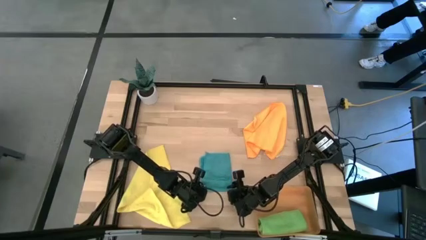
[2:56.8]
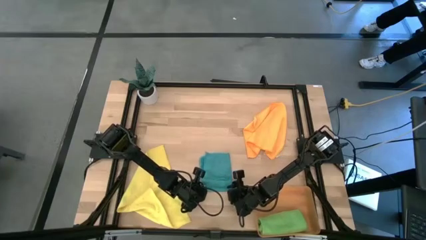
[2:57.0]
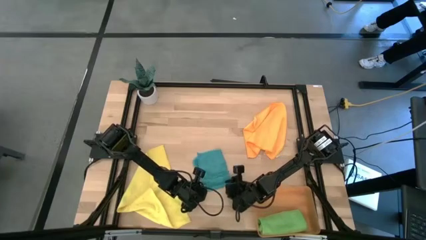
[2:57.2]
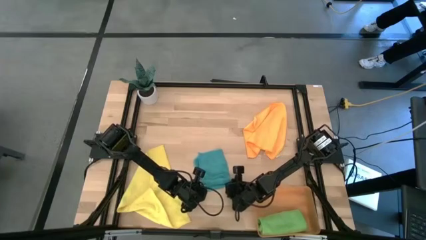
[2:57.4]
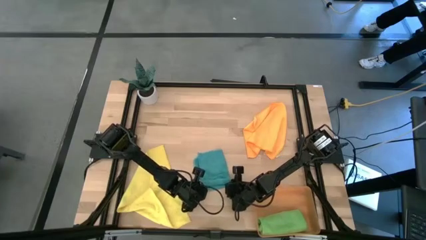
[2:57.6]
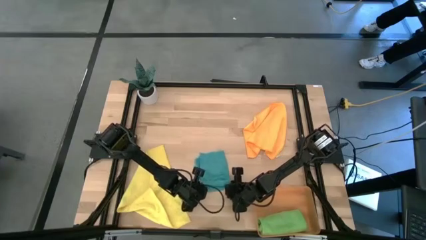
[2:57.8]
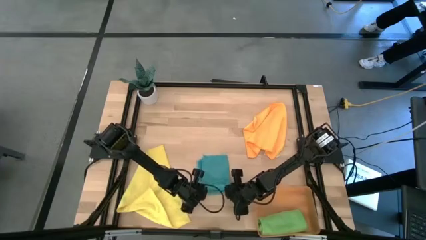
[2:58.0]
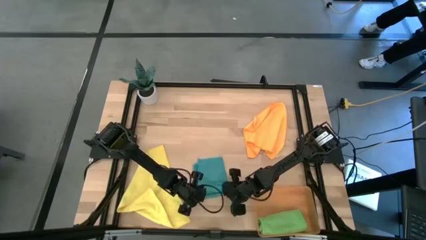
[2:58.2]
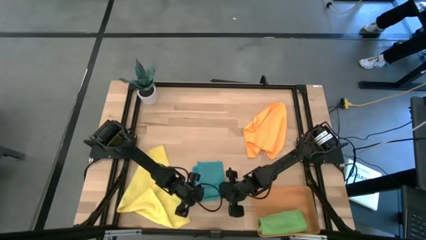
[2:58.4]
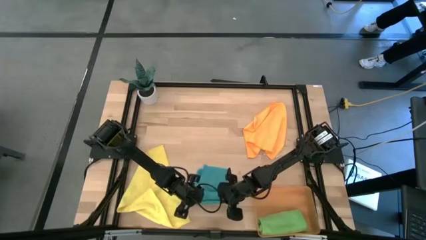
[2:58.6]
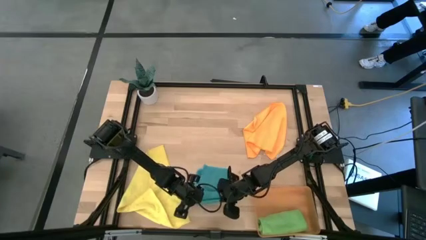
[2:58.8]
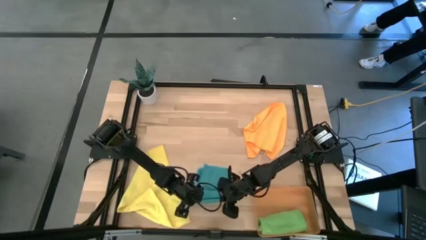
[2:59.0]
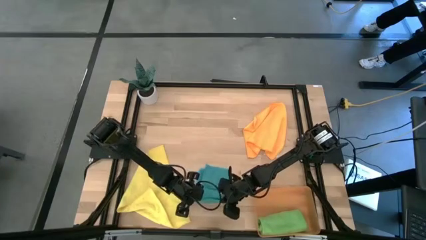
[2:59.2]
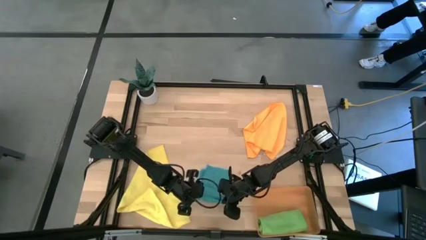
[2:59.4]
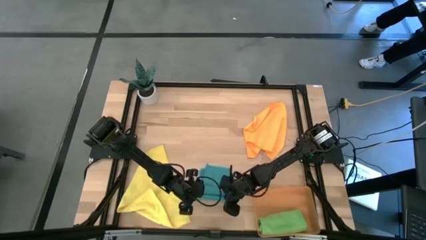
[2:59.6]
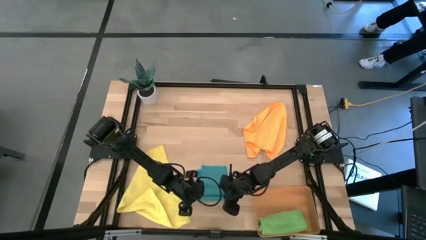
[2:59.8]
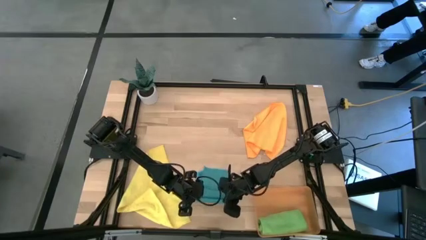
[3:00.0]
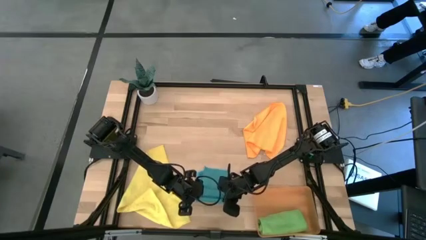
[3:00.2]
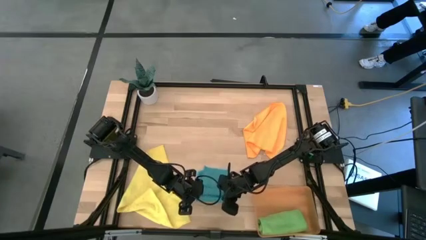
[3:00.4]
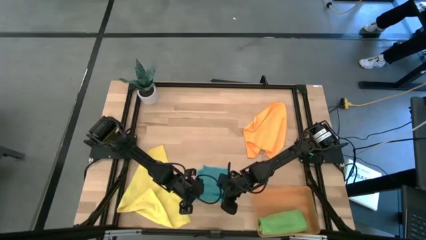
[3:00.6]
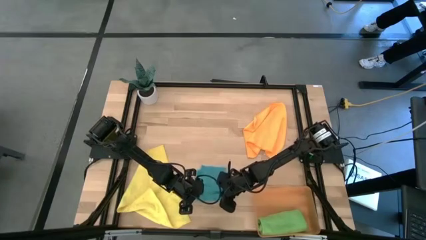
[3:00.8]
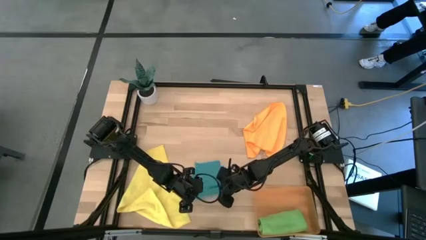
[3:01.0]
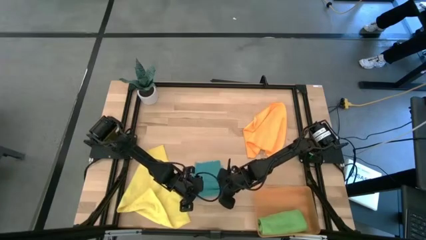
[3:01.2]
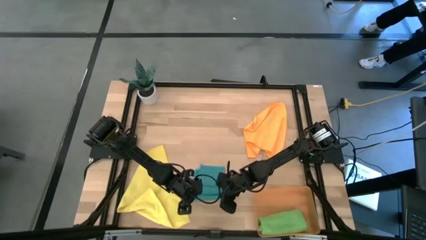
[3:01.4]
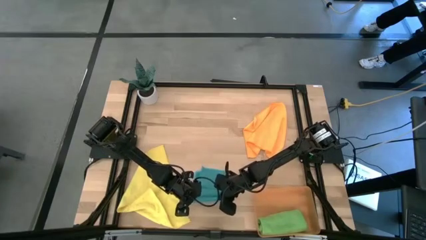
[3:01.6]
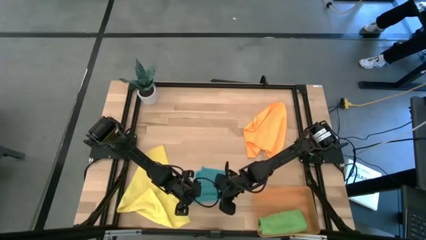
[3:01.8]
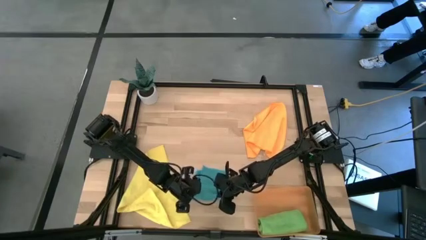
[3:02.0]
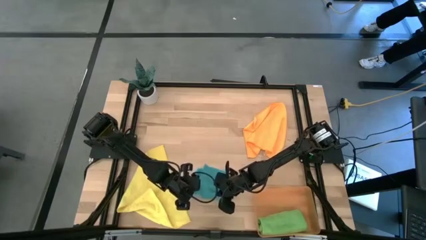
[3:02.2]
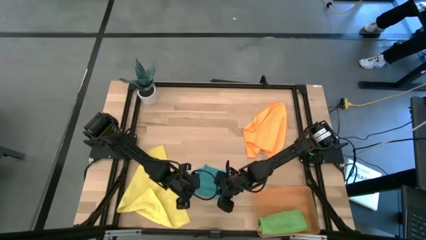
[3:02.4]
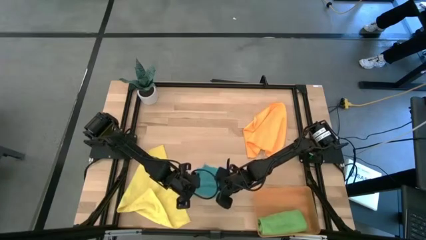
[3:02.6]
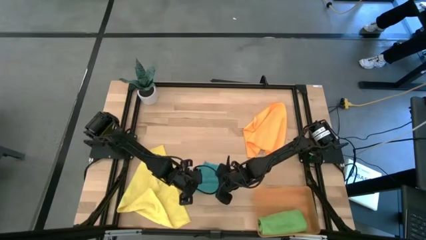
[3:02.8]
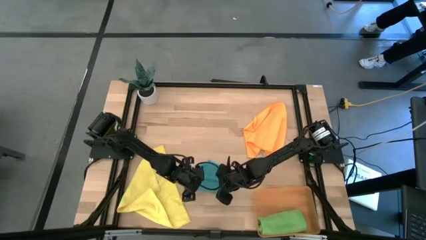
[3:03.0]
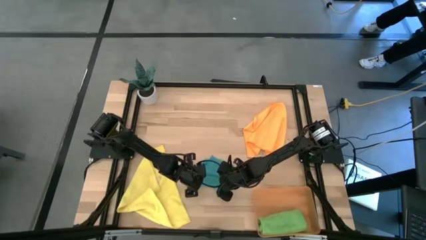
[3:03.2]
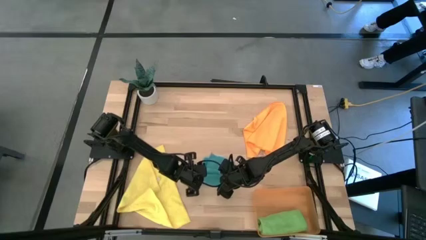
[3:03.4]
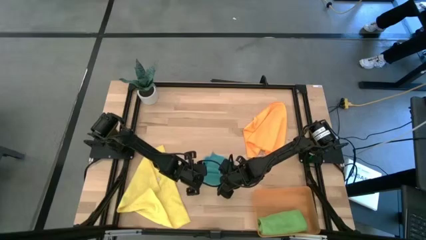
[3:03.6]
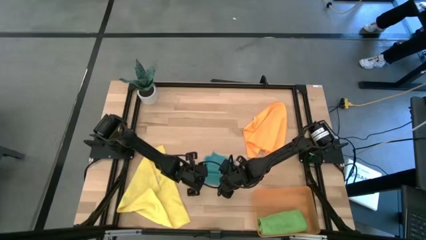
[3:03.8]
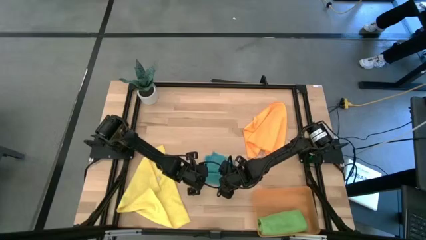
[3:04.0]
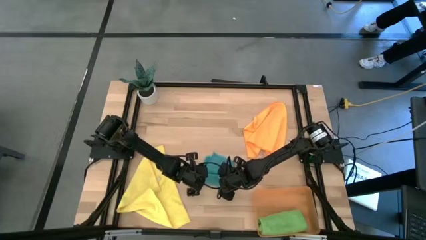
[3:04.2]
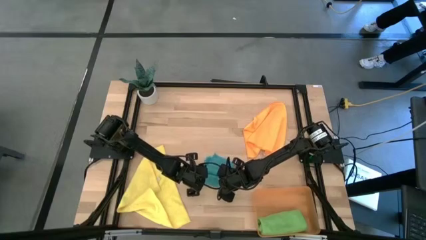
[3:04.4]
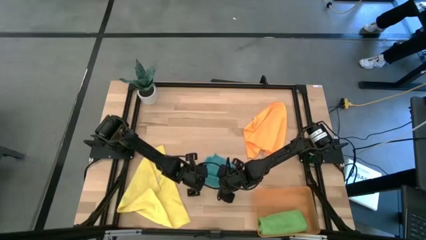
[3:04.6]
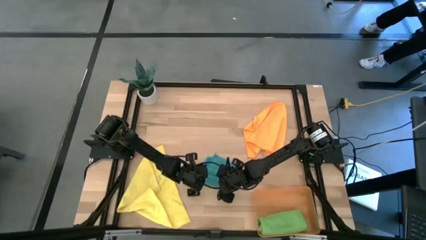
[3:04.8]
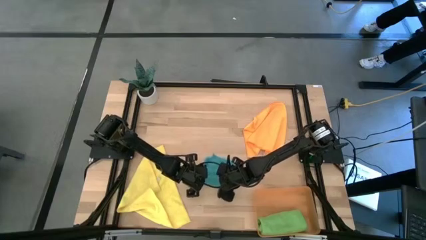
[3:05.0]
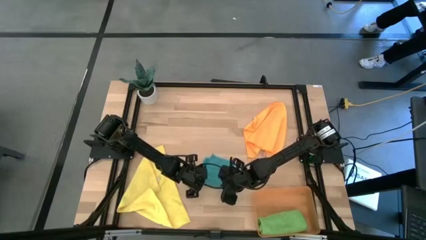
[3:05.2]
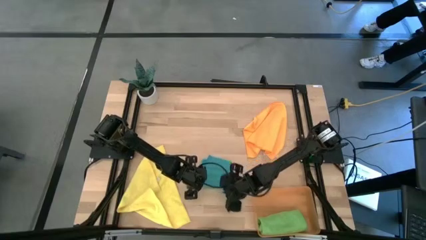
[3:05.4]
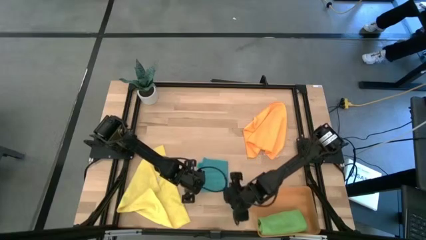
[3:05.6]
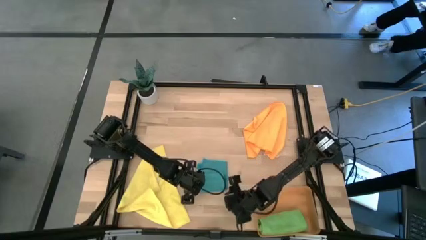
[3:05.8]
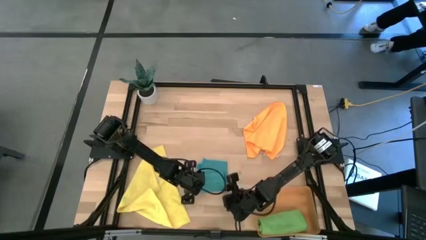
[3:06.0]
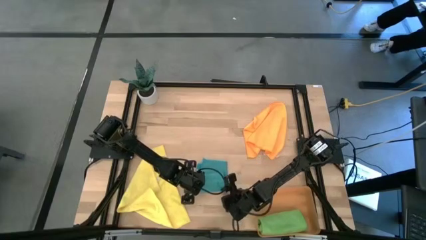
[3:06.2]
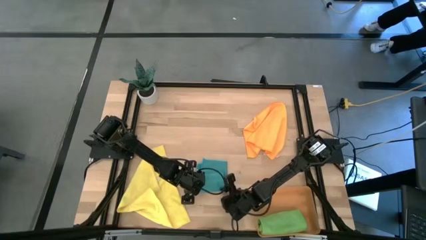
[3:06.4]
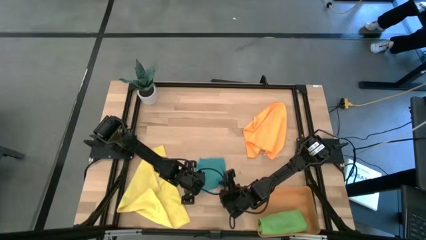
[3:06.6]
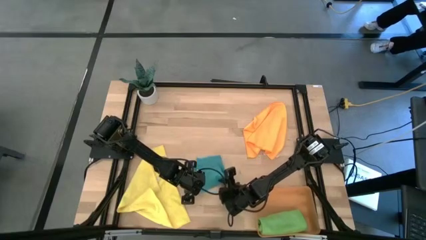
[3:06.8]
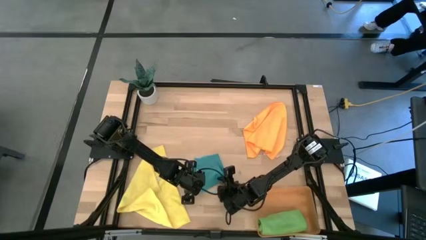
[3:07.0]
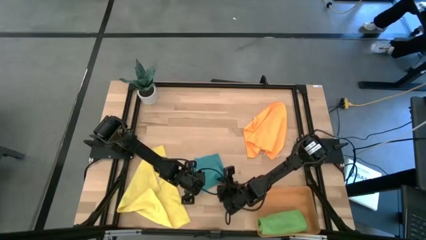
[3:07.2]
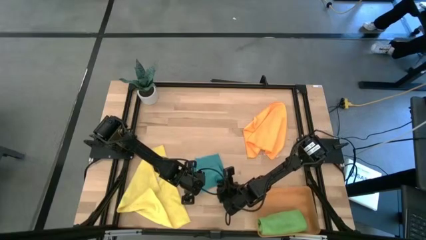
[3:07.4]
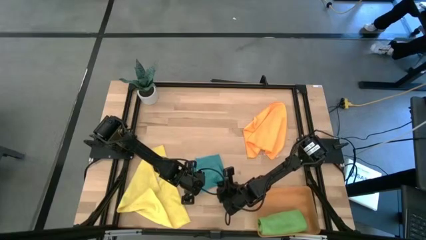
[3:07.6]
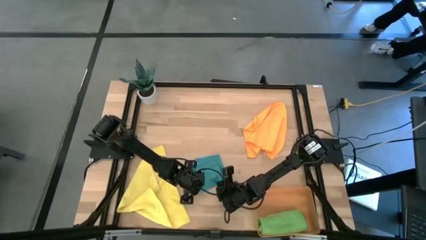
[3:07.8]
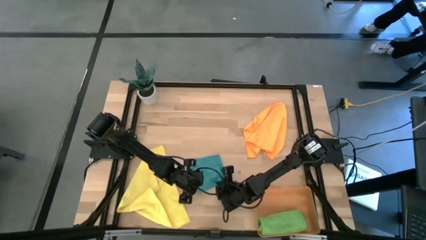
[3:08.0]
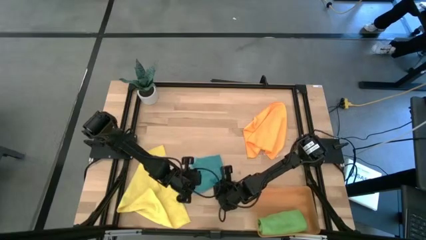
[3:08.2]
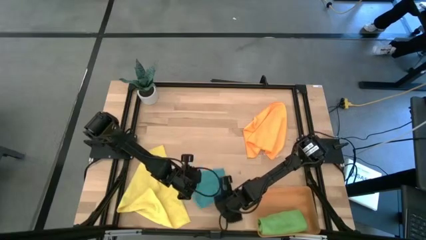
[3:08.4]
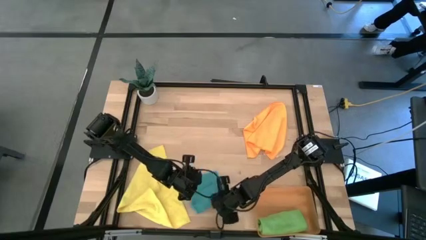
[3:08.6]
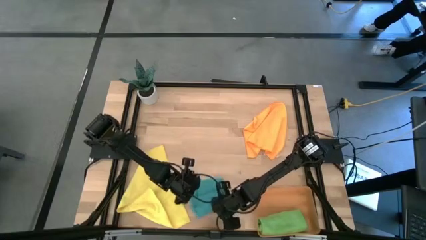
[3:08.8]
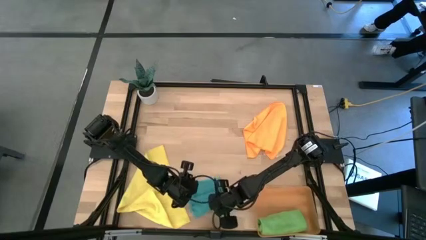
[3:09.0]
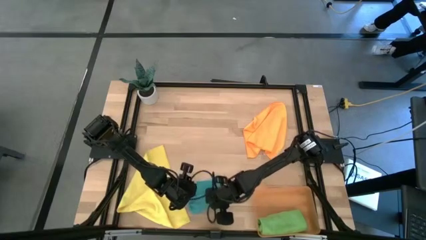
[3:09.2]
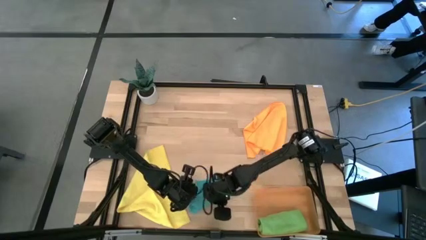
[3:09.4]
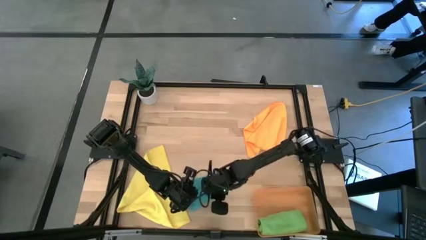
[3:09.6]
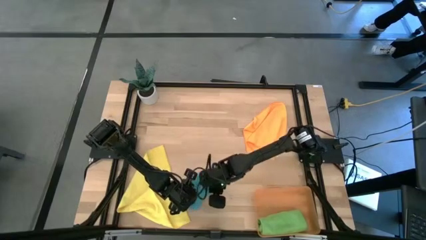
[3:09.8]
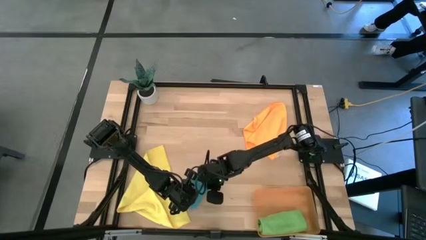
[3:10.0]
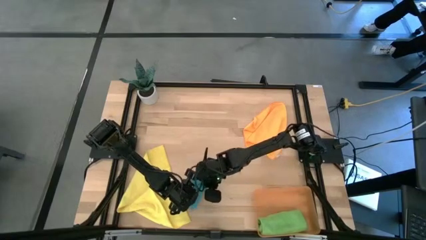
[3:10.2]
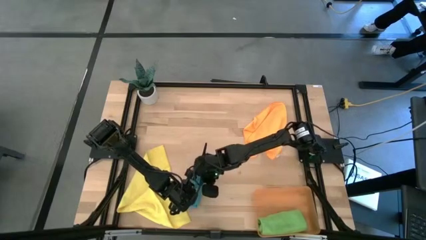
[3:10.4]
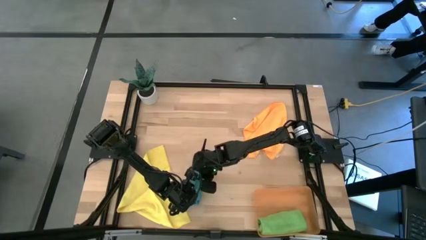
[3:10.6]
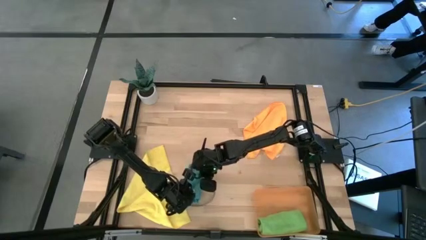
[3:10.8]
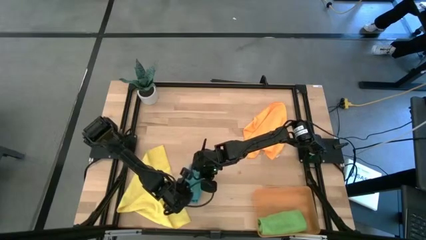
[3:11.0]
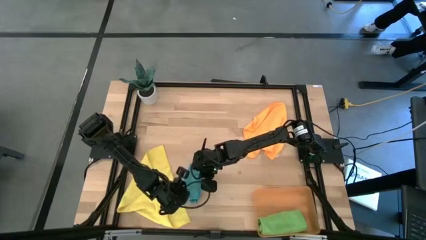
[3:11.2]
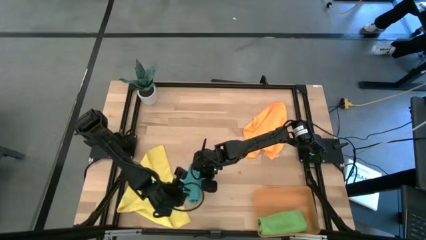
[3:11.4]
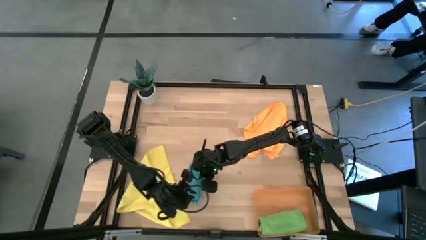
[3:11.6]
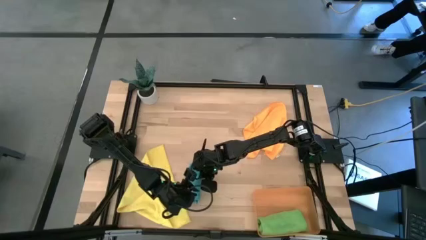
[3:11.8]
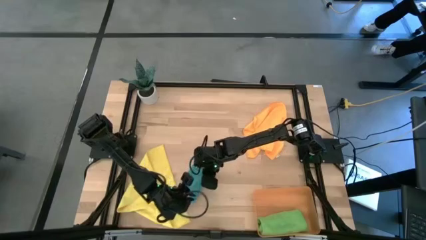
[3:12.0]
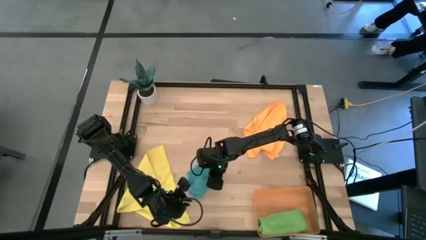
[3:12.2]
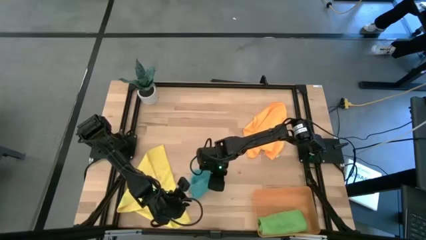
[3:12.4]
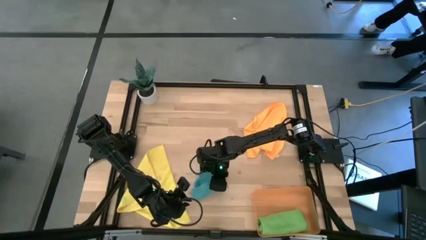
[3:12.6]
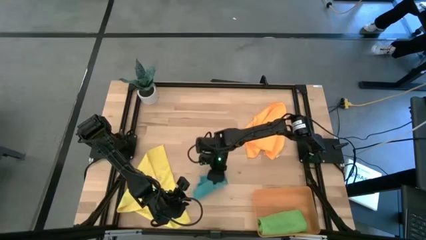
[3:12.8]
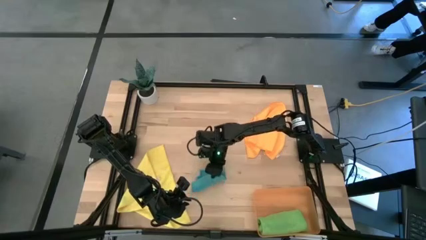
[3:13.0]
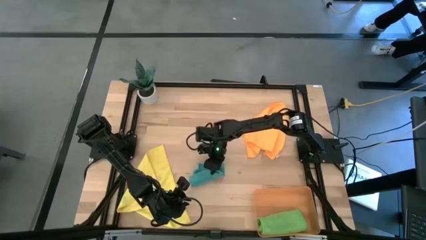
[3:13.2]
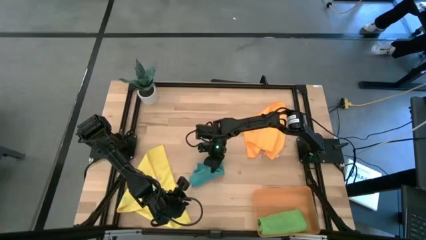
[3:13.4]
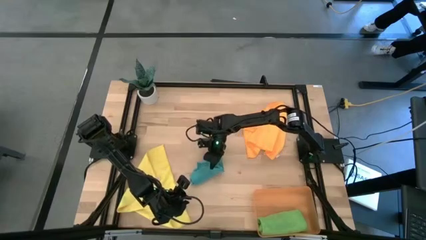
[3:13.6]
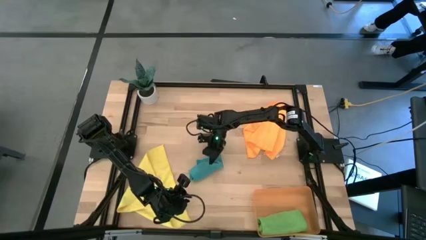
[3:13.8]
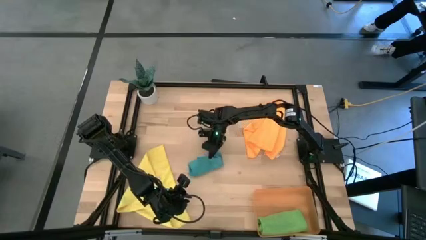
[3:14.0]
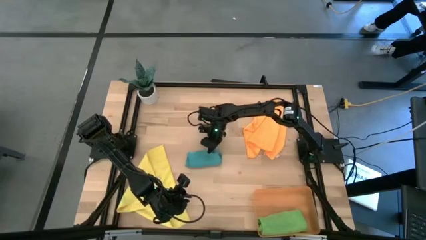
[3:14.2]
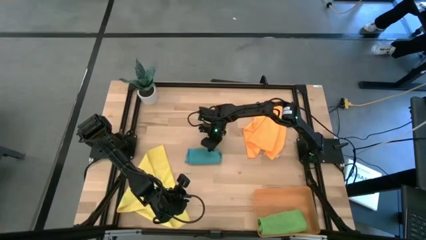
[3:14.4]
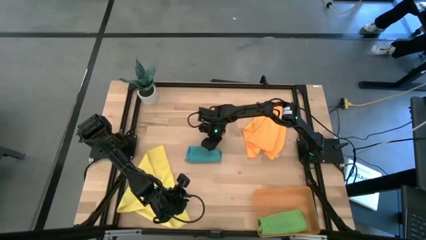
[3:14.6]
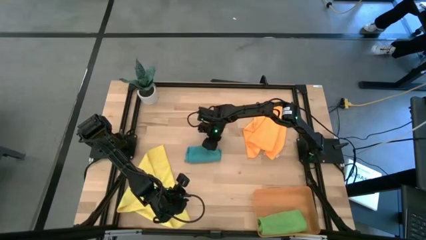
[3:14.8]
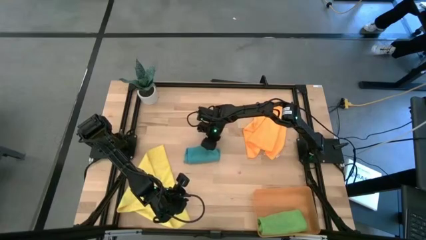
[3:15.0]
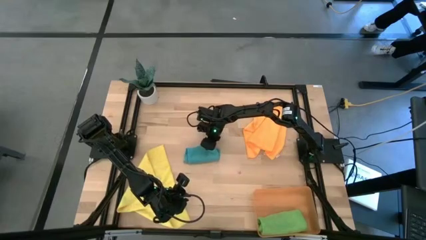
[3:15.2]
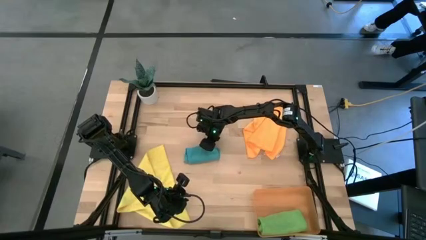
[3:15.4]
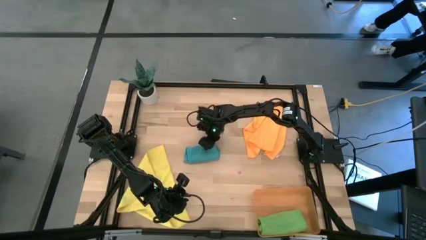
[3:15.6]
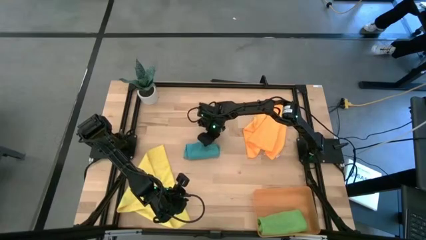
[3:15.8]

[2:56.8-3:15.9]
Task: Roll microfiber towels into tight, uniform cylinder then place into a basket
Roll the blue microfiber towel
